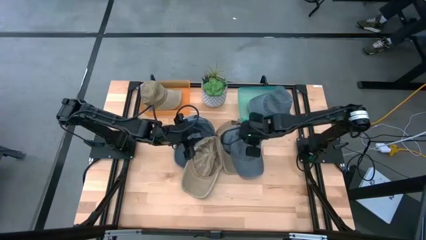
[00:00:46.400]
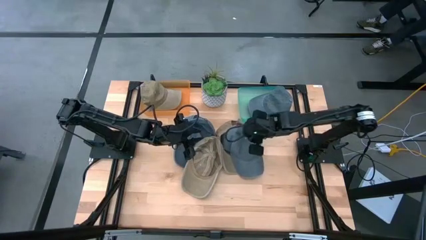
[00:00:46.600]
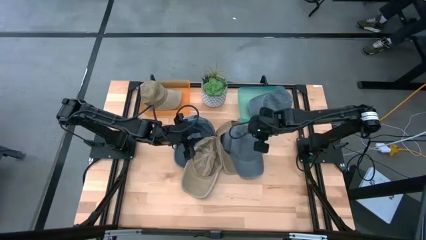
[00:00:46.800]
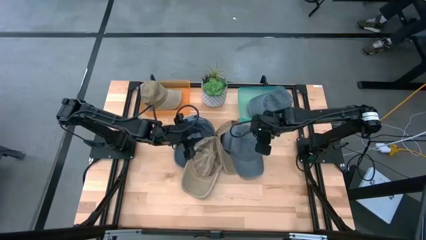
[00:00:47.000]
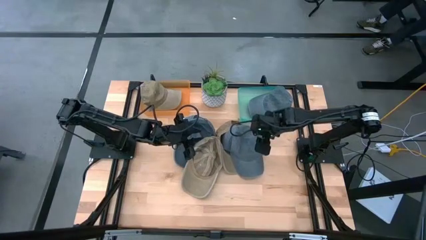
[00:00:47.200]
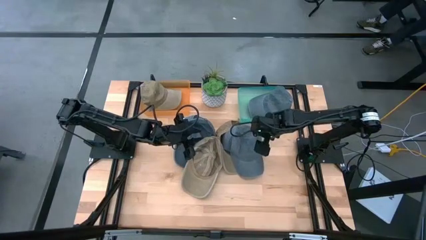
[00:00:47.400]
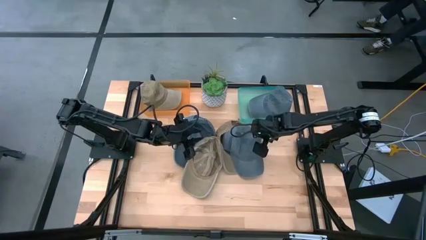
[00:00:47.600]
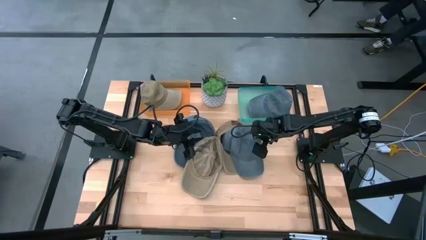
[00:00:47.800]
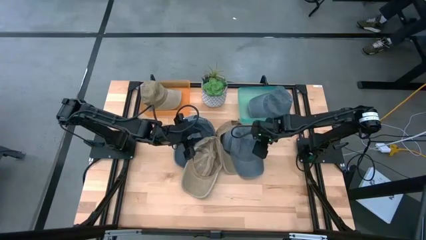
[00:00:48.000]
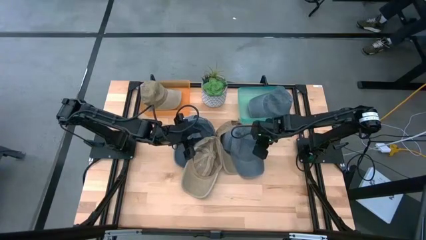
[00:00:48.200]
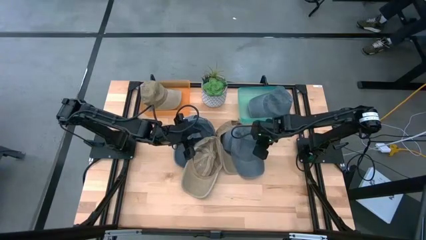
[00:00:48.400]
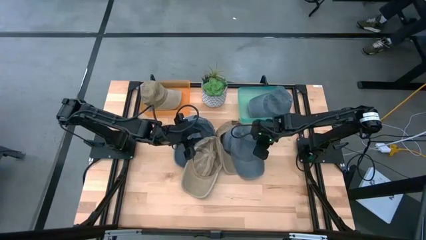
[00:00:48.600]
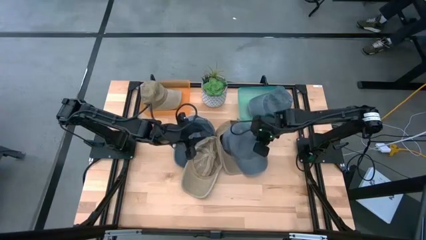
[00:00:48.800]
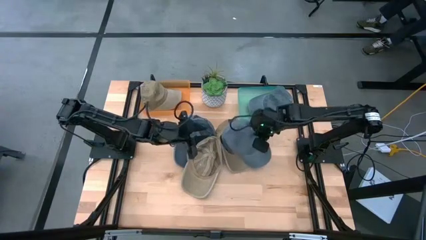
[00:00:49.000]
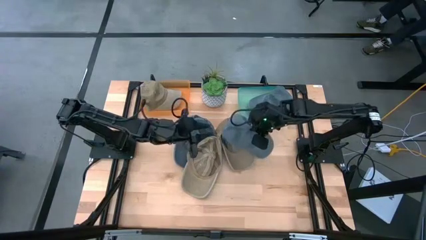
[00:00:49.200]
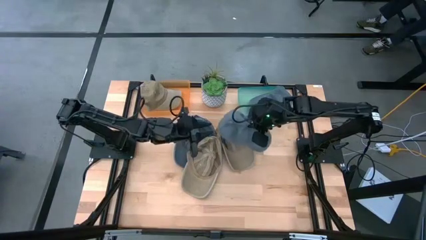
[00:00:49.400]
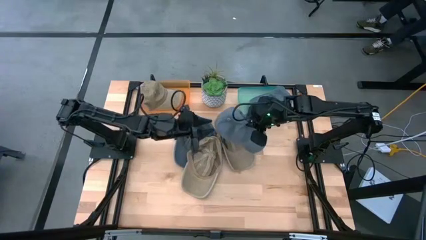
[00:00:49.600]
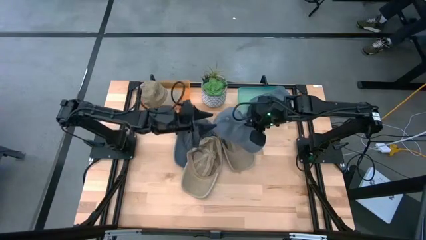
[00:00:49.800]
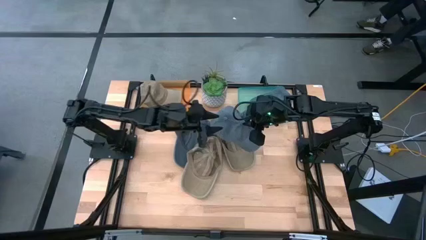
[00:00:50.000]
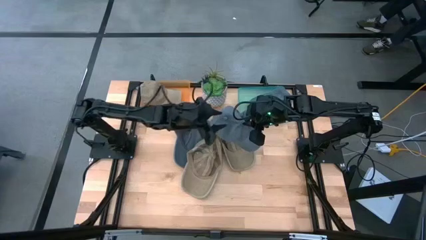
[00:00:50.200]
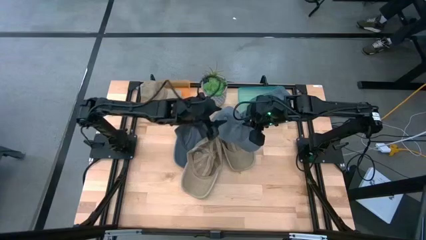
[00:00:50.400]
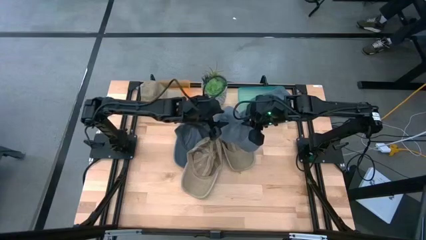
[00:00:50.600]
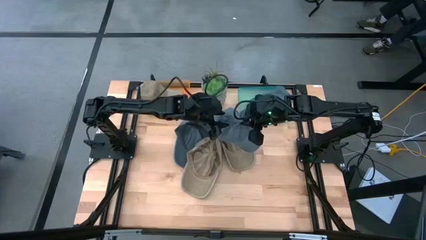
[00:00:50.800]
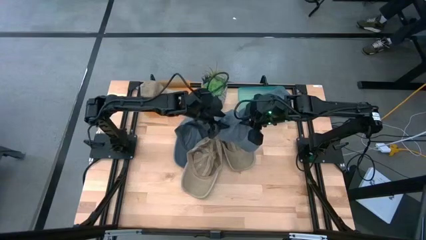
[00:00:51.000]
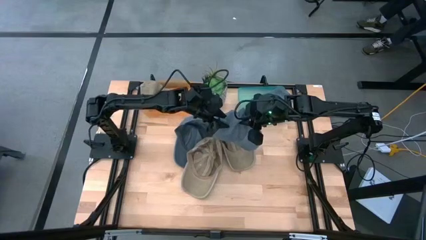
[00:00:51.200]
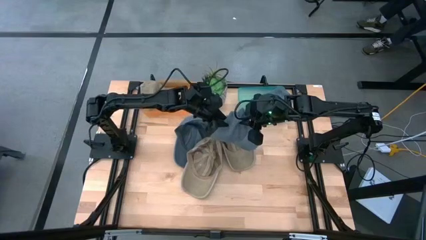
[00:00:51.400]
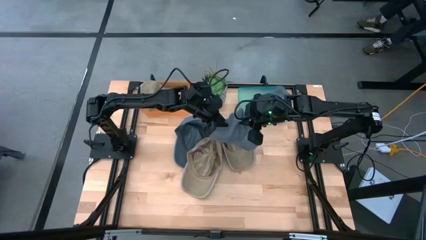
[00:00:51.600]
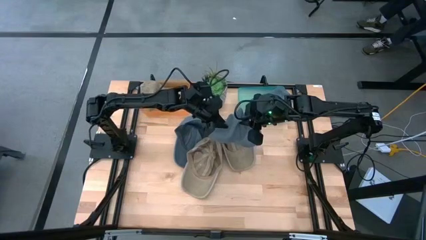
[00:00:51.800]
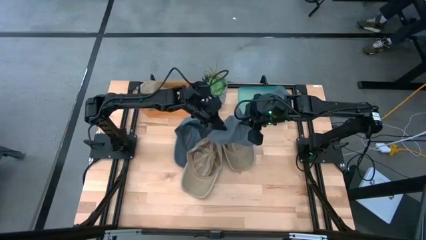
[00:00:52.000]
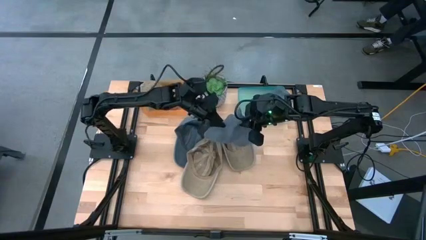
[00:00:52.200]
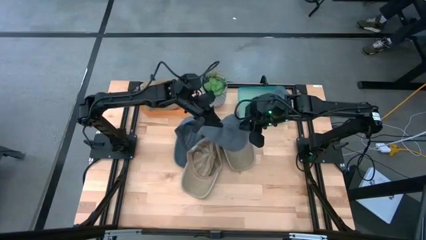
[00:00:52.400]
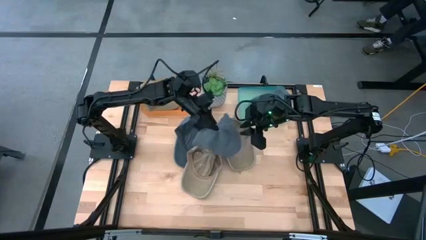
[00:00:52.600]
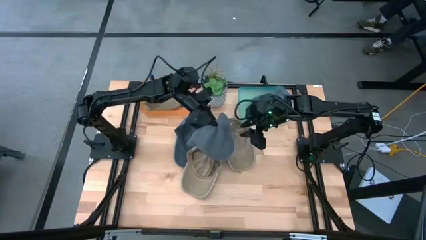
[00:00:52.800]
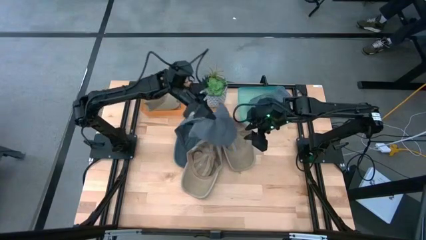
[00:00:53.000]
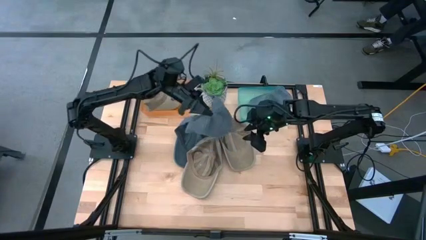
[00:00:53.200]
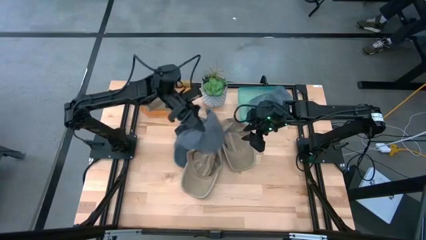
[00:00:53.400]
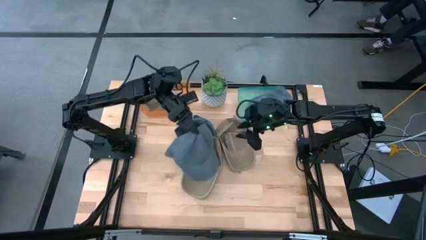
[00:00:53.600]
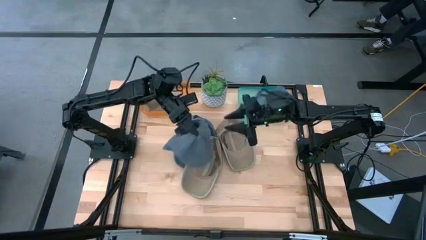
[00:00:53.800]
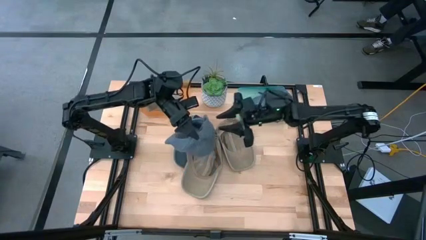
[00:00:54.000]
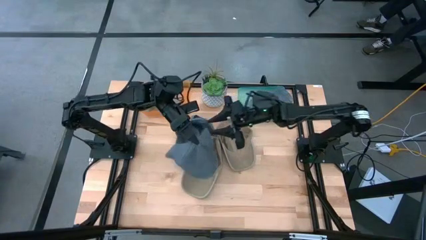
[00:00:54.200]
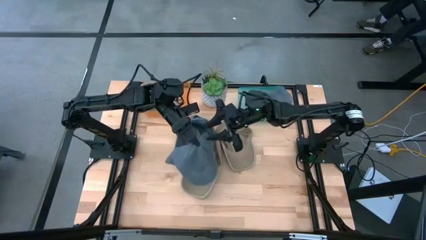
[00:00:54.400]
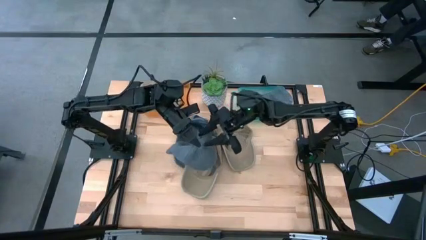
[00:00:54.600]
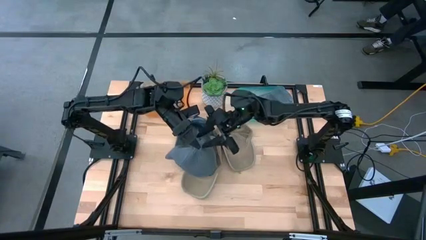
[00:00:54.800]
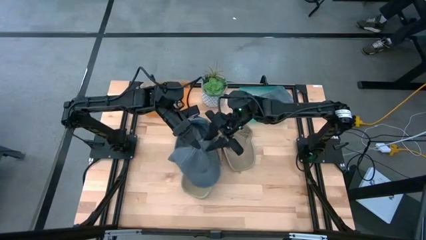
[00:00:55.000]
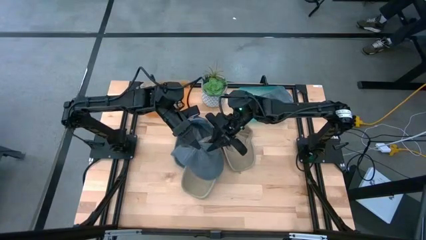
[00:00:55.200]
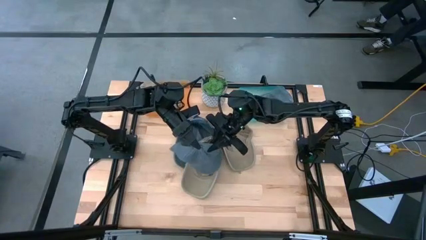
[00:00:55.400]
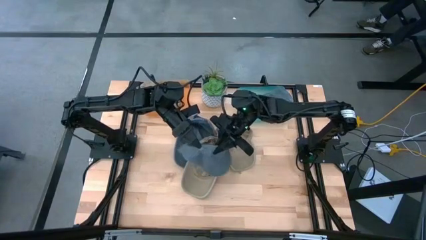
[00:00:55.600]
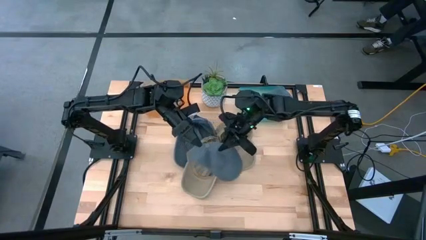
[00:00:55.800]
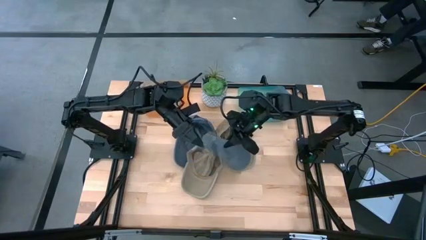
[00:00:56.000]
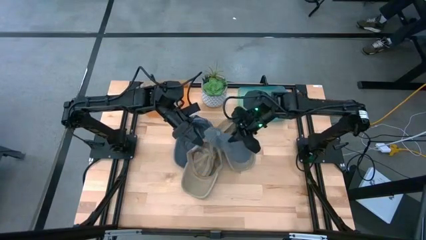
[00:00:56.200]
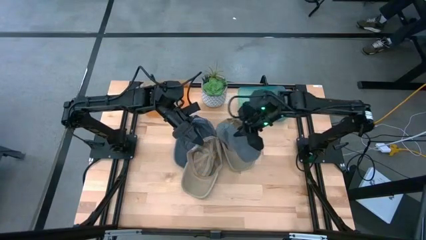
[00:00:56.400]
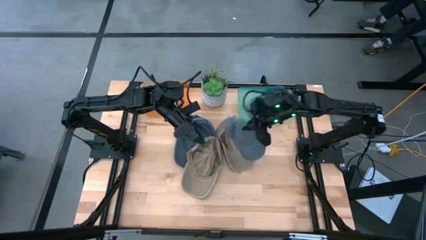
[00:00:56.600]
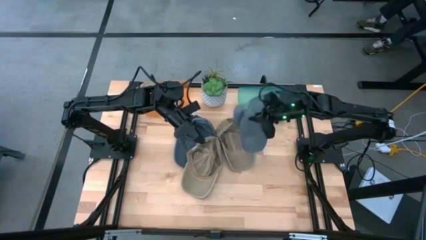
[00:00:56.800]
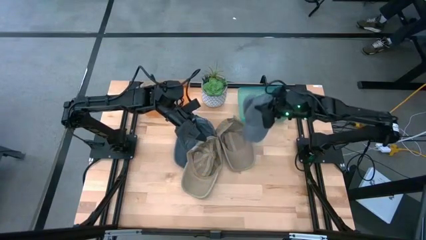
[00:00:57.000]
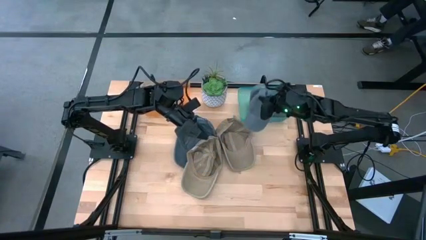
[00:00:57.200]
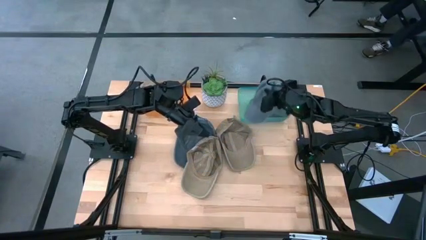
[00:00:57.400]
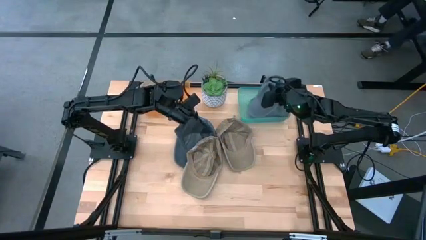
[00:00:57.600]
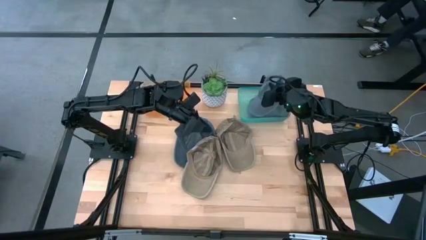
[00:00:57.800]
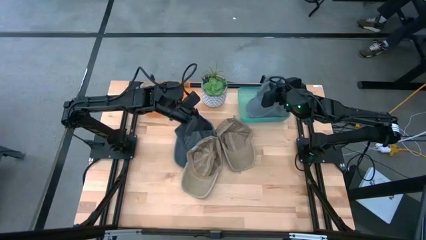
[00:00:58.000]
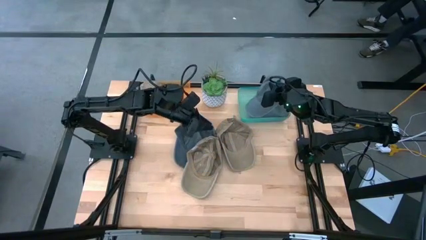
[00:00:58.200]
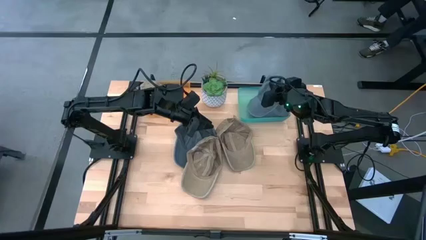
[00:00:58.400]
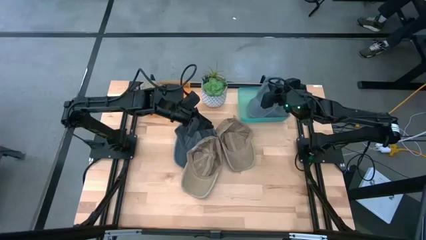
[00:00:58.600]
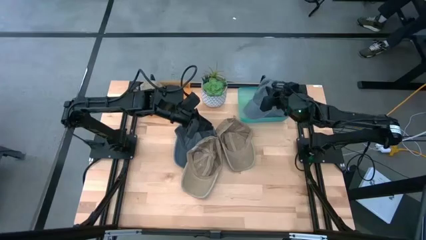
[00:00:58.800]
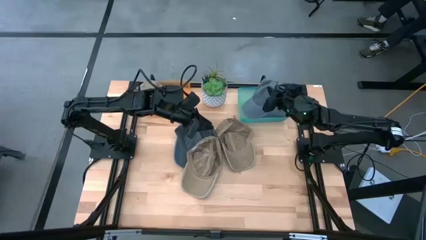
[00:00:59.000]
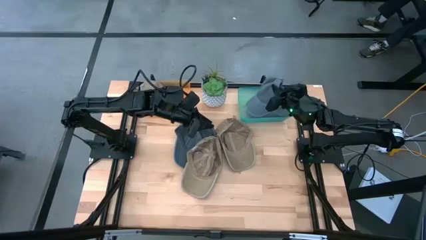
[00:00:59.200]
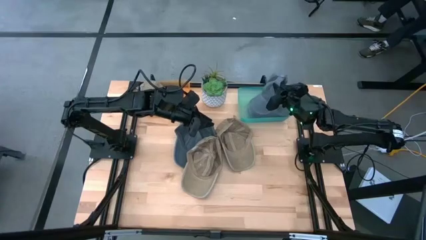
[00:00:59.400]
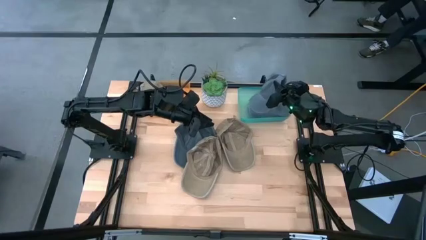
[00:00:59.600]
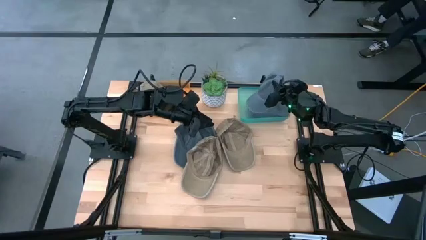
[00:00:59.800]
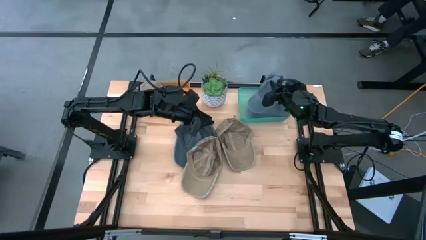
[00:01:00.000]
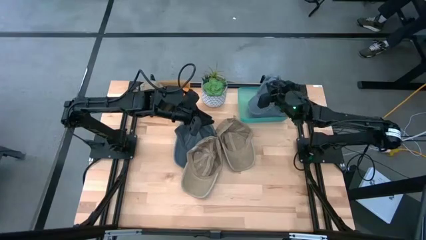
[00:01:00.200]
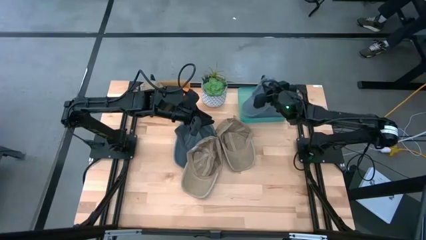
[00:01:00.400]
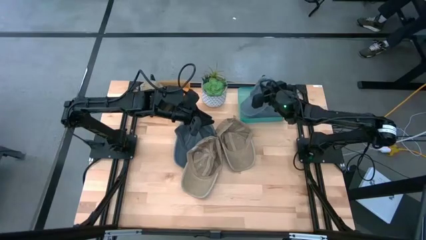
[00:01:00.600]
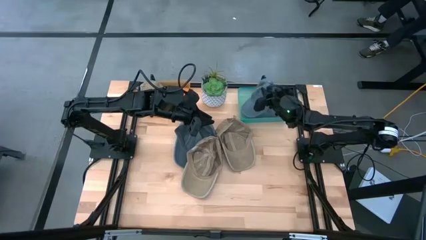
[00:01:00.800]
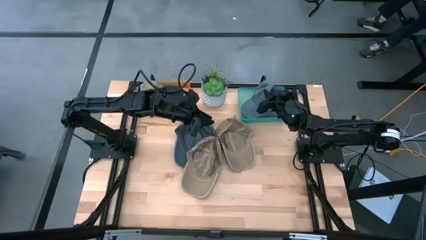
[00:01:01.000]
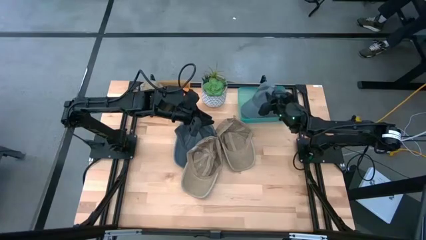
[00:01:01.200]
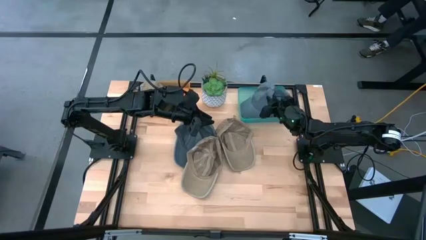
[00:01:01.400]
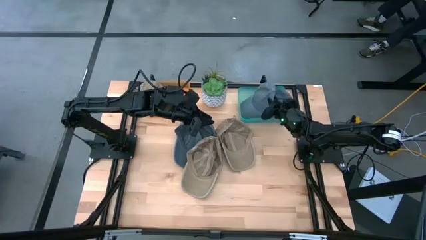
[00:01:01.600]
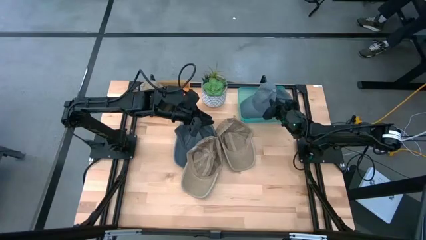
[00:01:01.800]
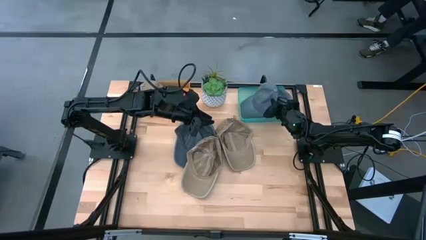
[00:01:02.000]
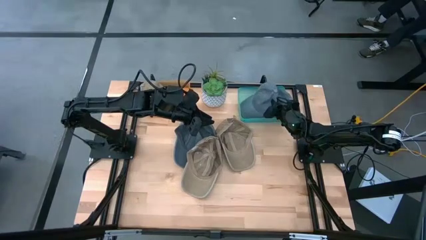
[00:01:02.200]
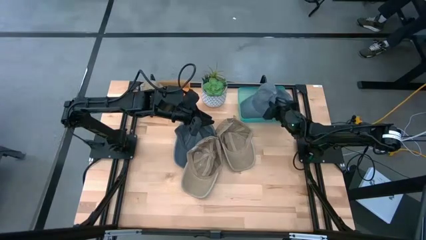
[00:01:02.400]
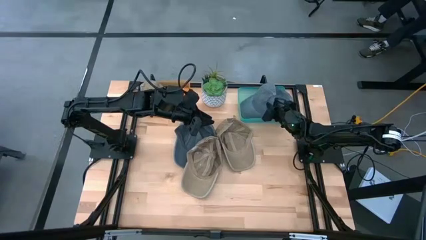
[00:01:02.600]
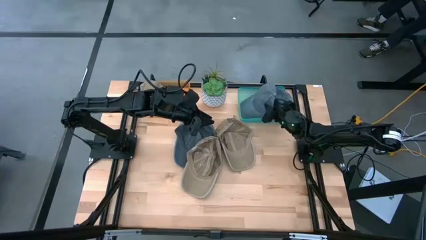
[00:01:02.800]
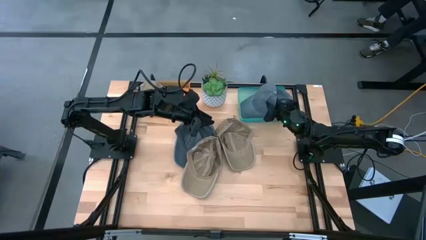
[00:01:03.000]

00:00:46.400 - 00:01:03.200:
Task: Pick & Place hat
Put the right gray cap into the green bin
